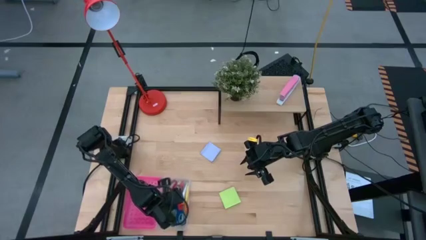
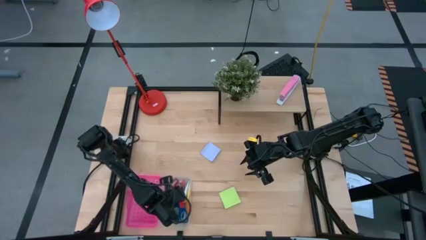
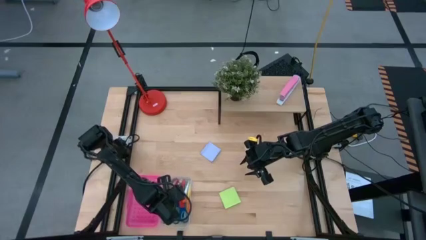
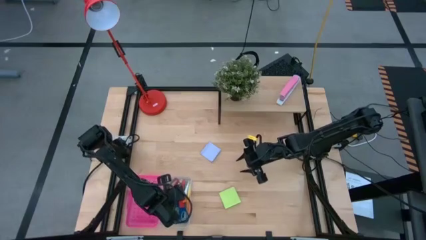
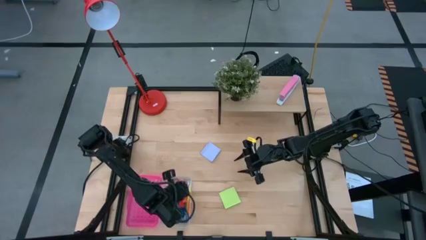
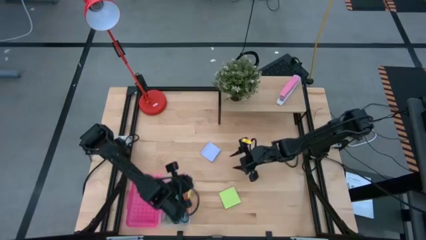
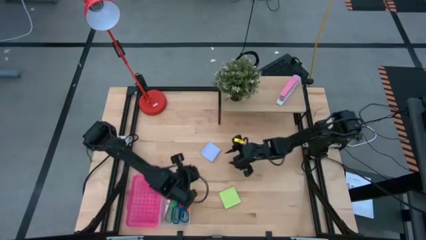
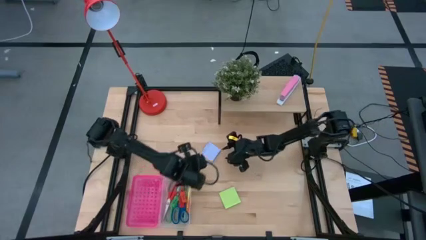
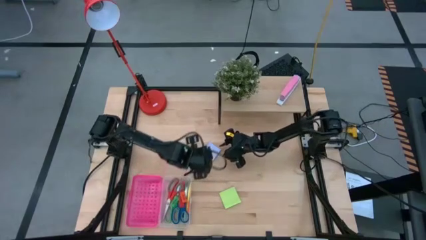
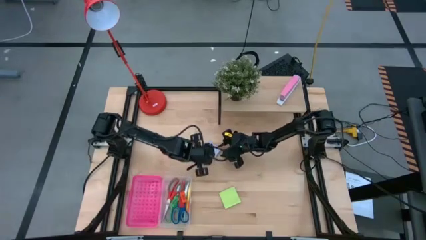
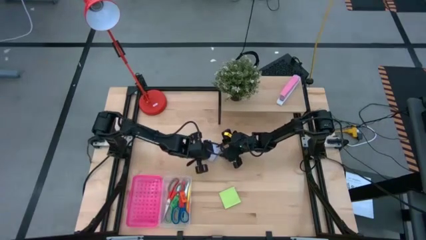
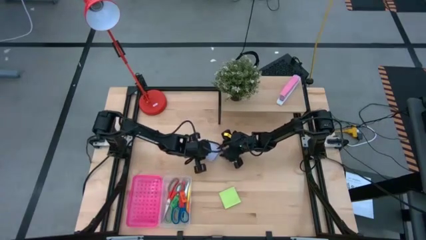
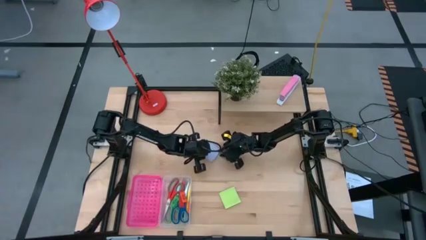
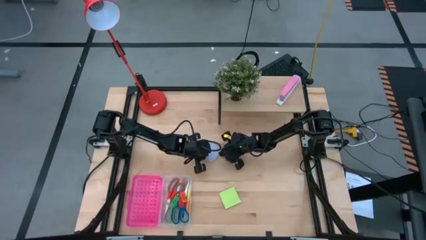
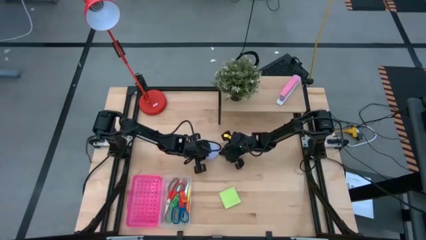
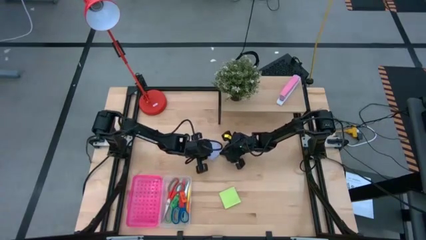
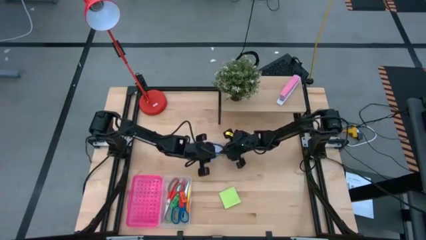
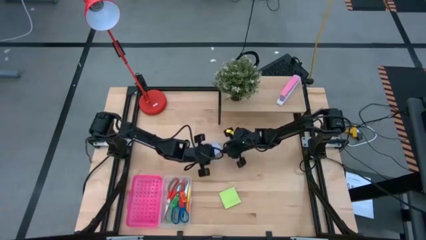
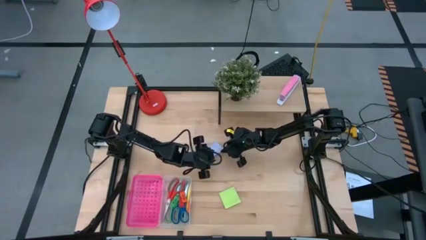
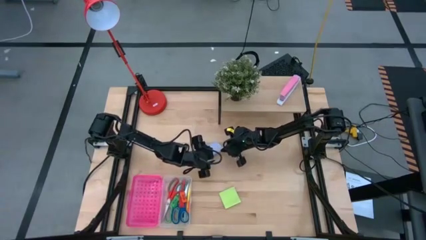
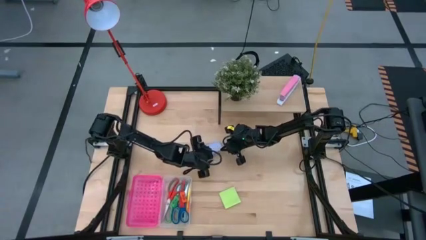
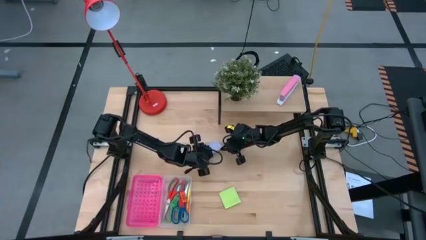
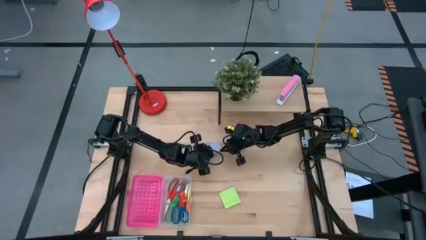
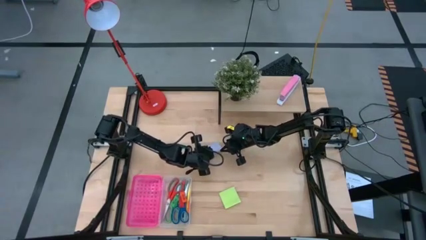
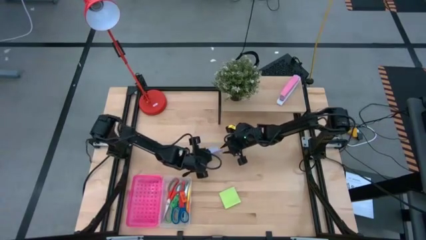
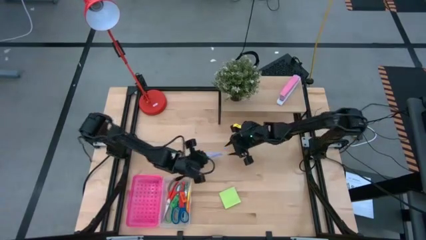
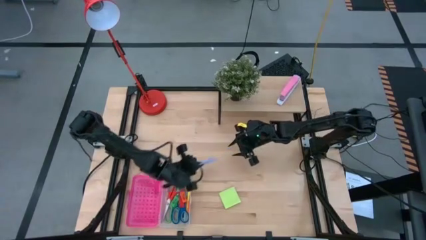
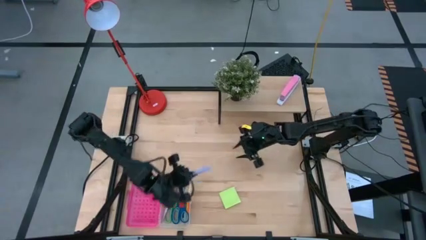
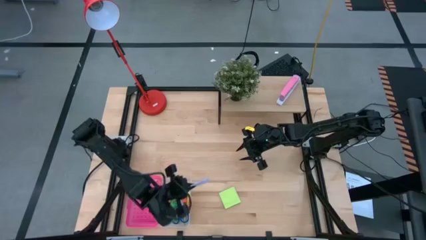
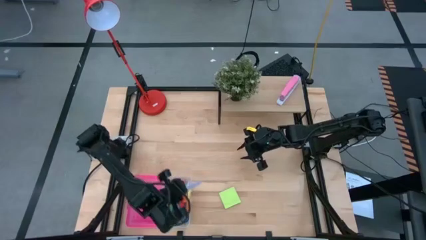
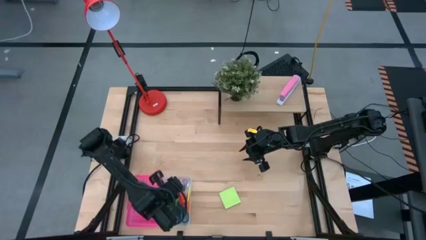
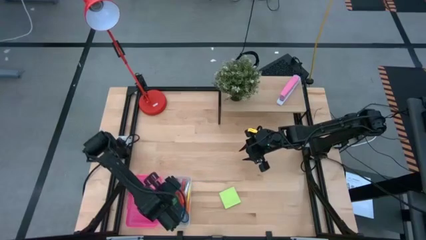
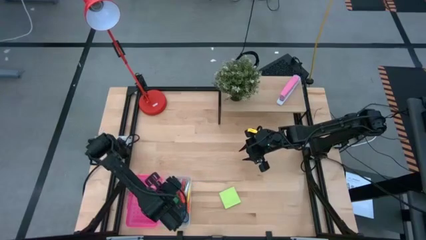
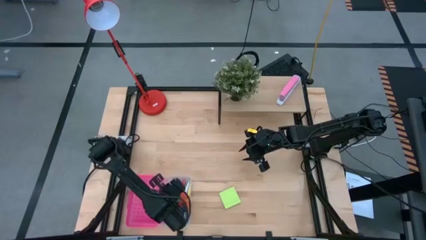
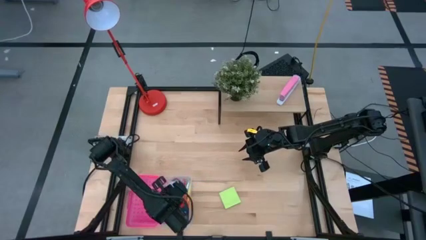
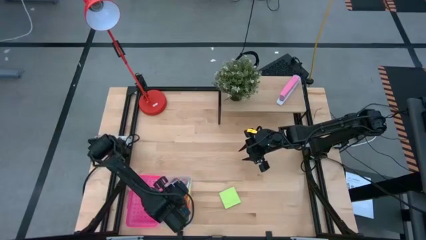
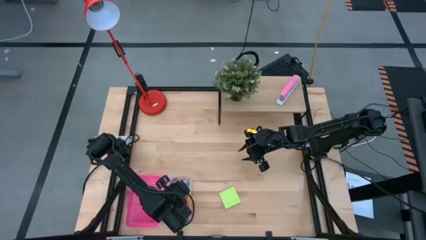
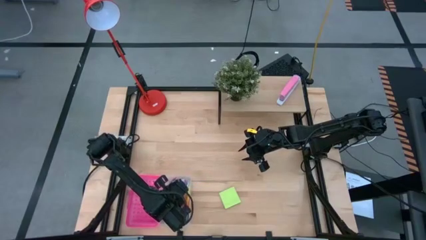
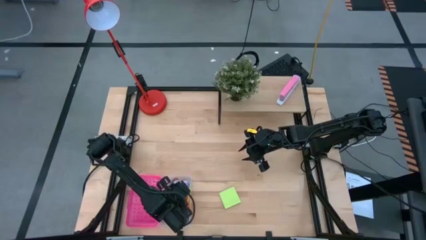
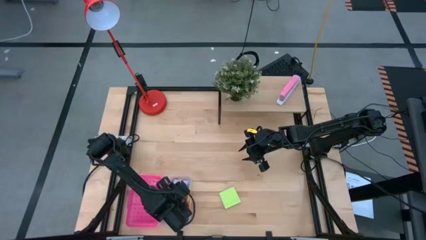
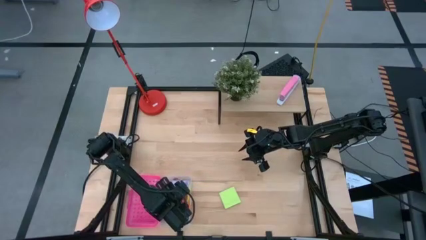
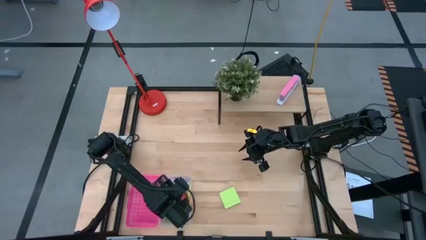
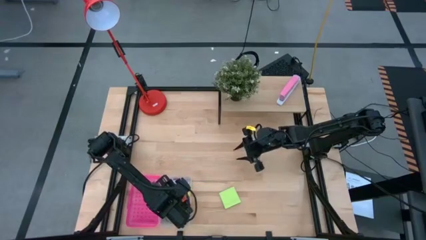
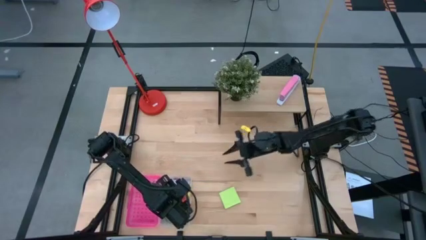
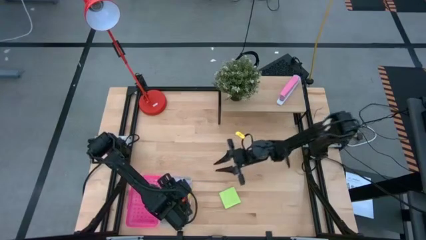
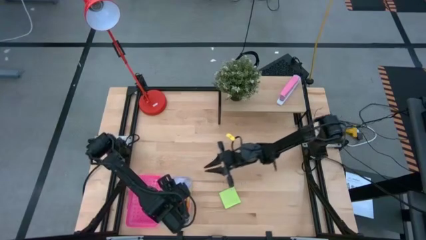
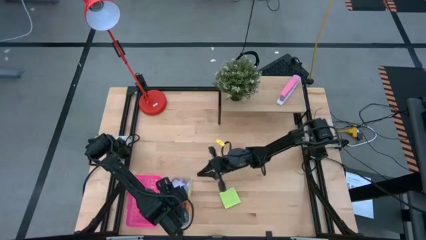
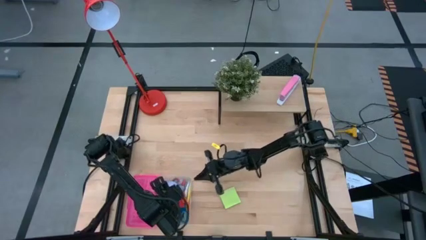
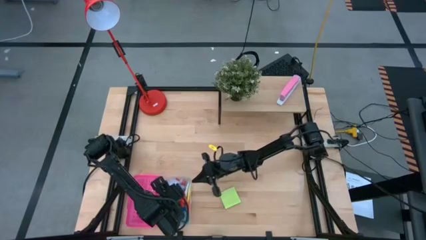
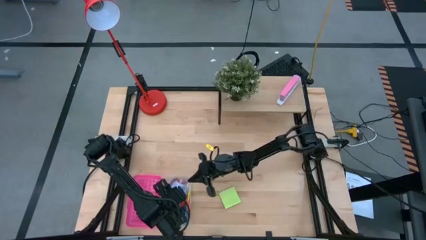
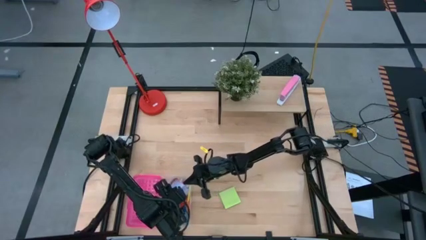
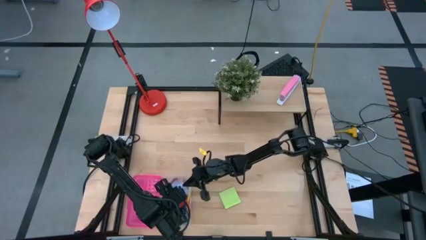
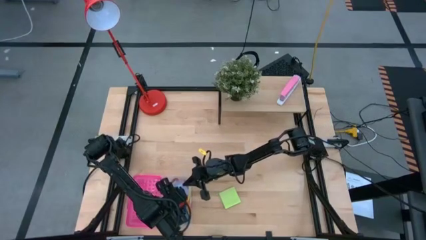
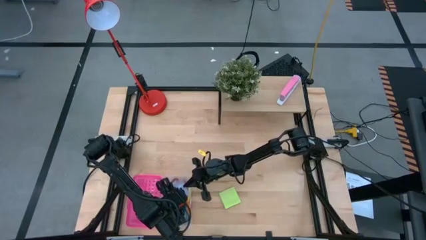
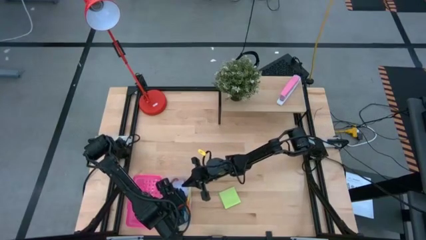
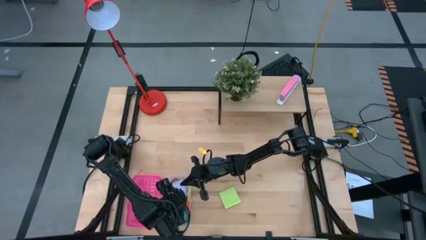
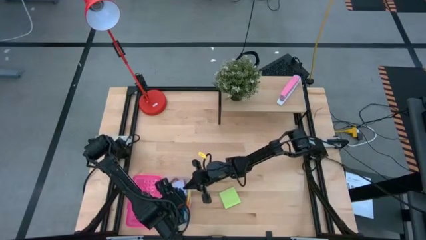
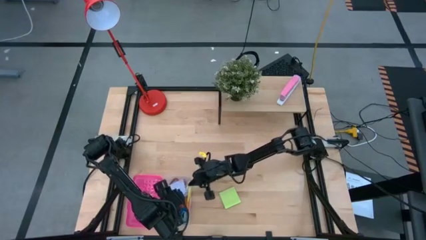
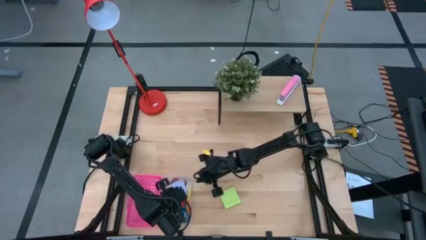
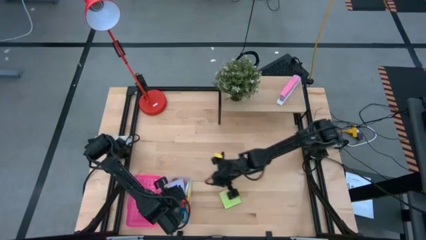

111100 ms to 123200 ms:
Task: Pack school essentials
Put the blue sticky notepad into the pink supply box

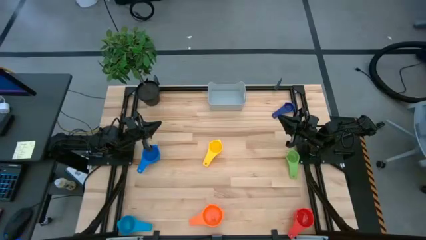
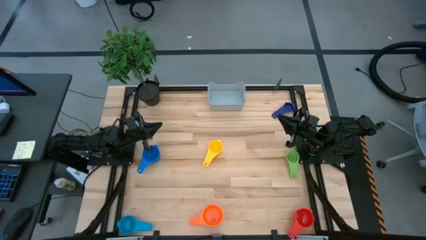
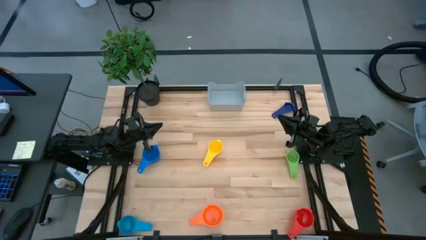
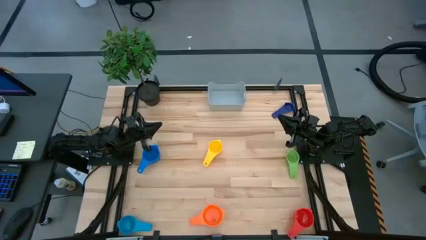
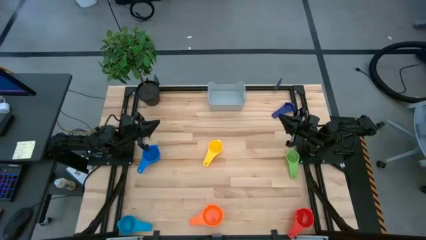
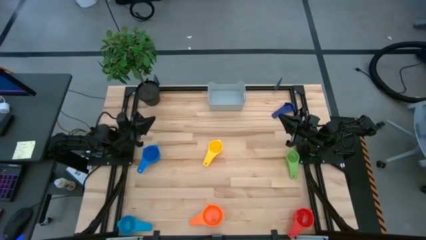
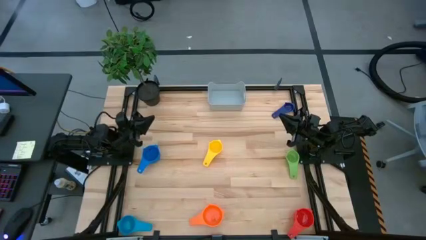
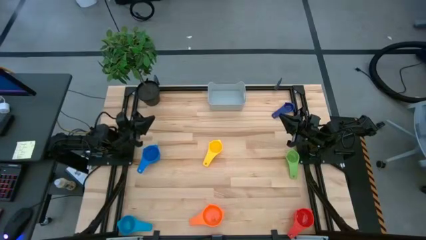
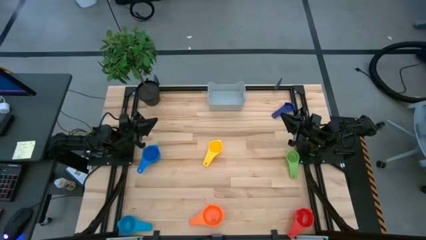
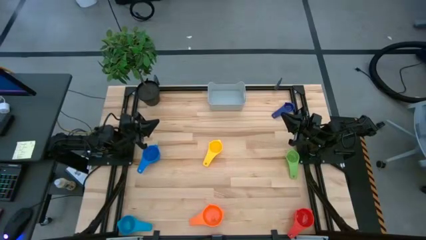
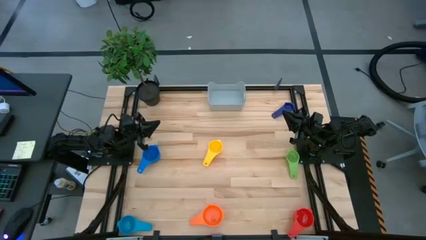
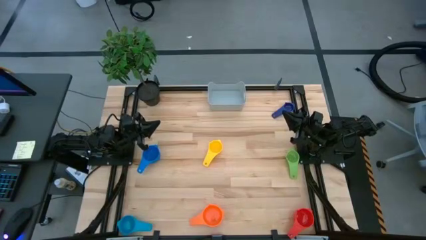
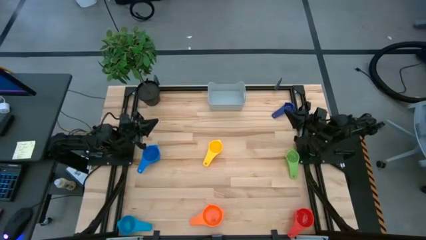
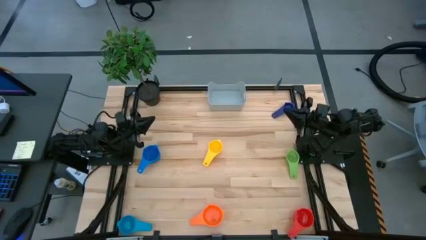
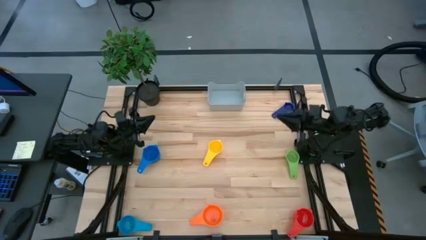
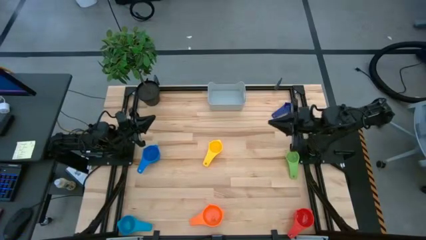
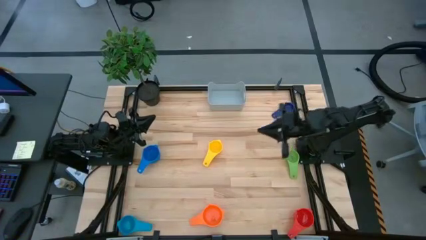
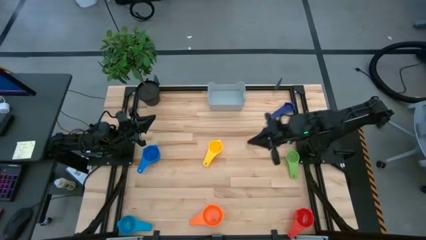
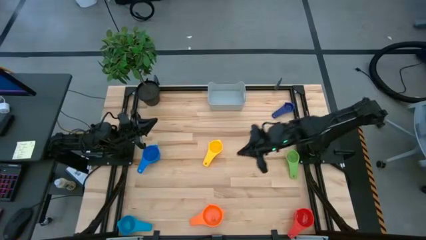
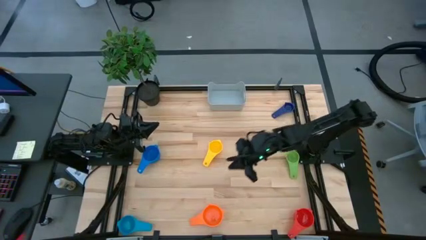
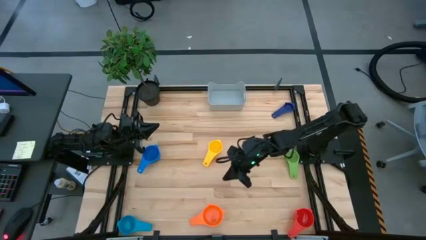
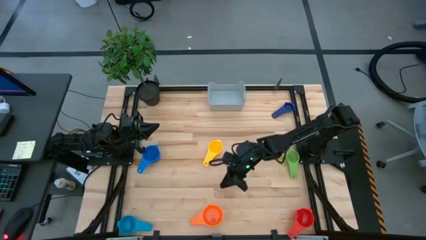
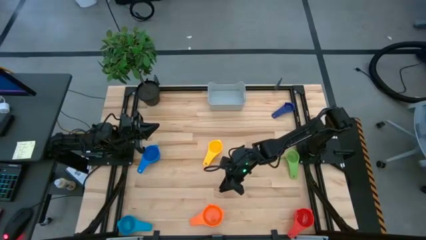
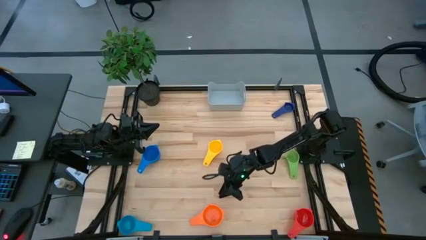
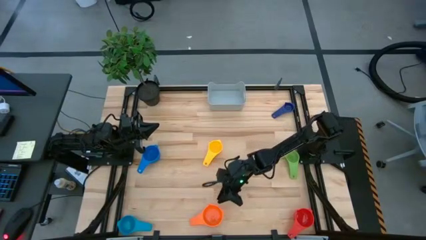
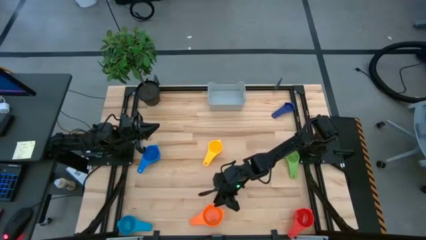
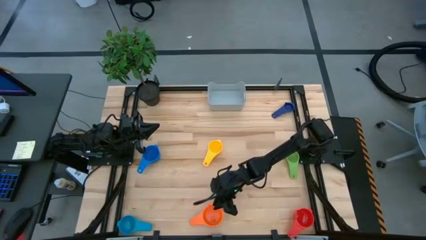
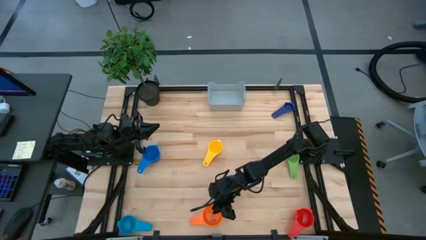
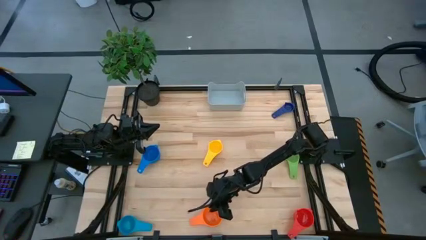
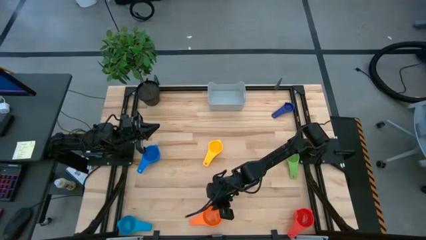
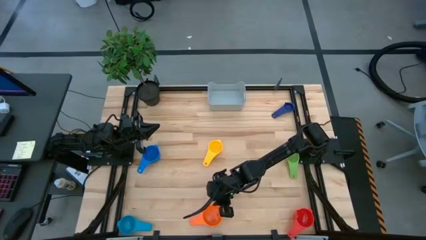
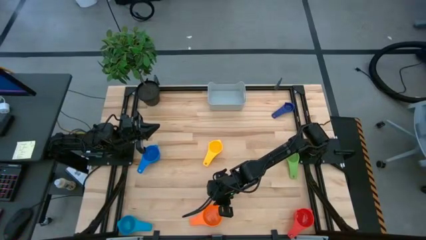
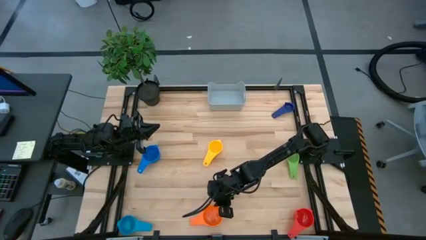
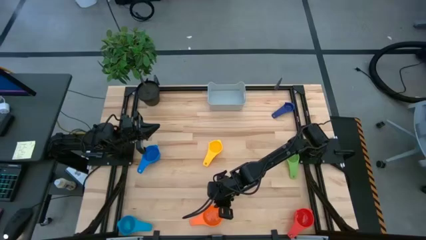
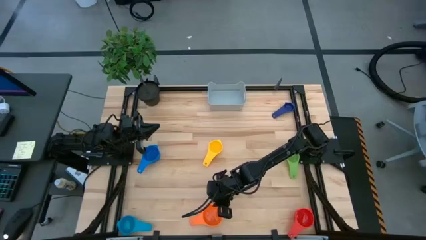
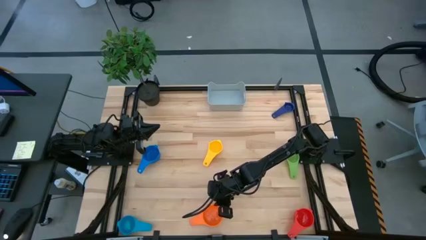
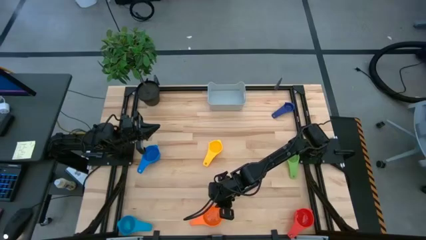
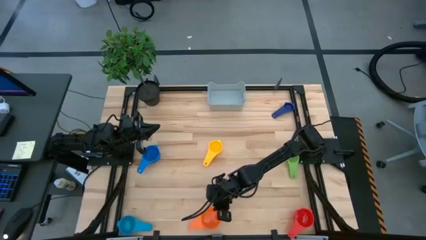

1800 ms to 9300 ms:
Task: Nest measuring cups in basket
Prepare the orange measuring cup
